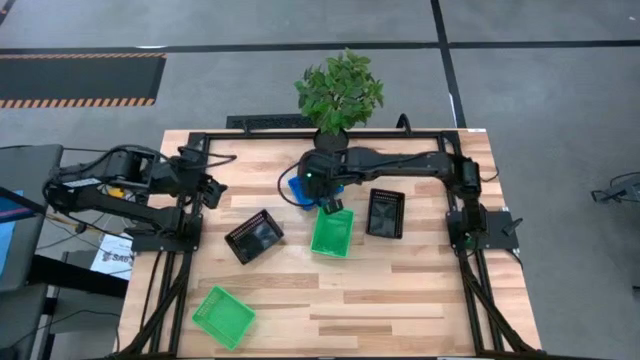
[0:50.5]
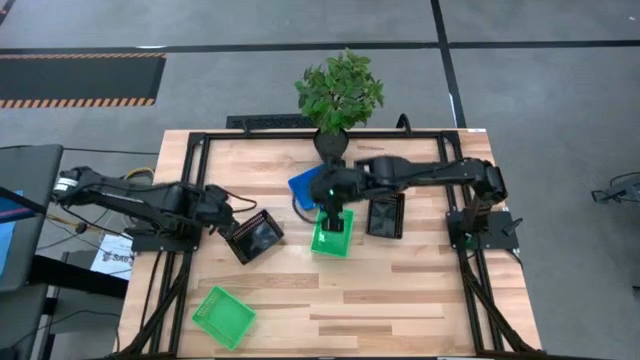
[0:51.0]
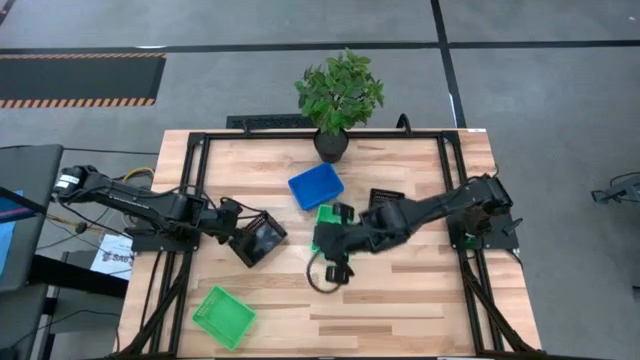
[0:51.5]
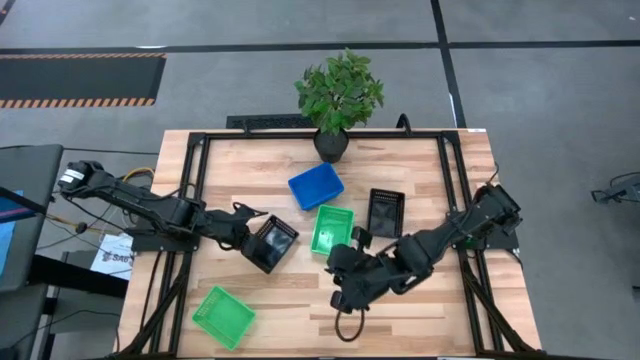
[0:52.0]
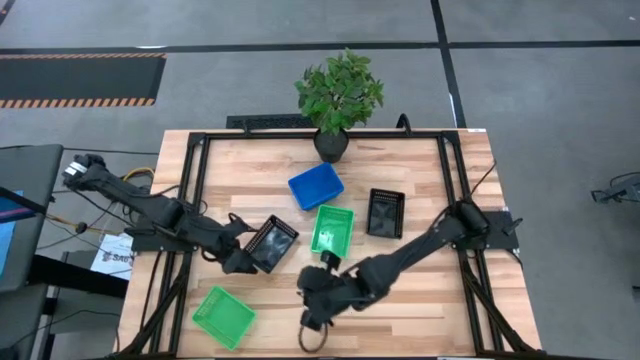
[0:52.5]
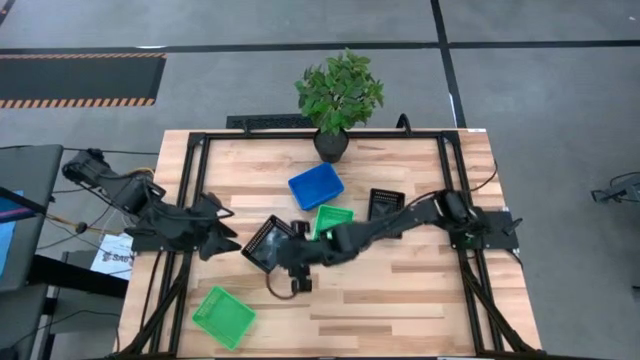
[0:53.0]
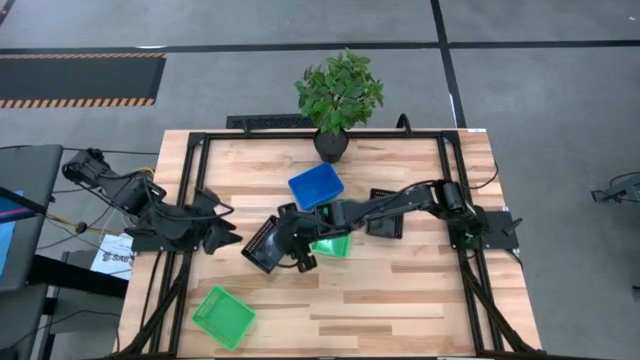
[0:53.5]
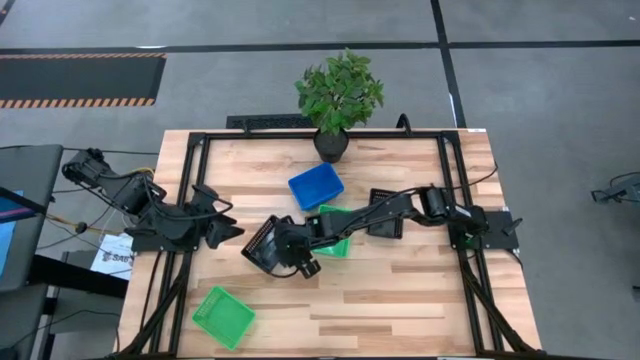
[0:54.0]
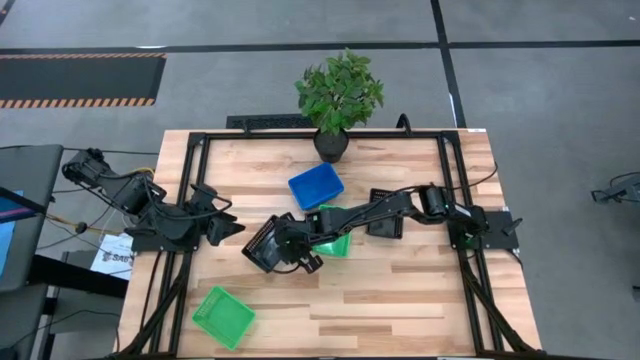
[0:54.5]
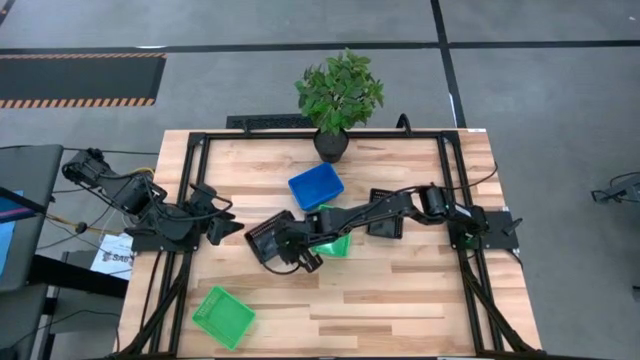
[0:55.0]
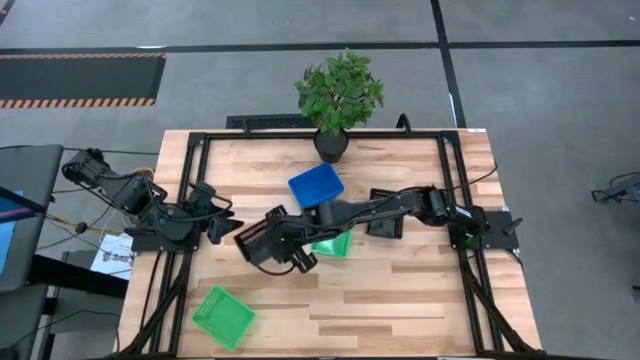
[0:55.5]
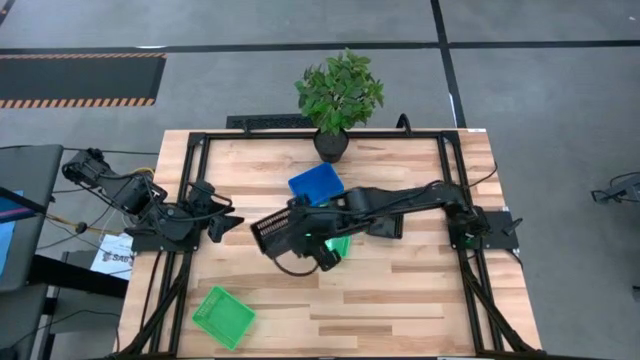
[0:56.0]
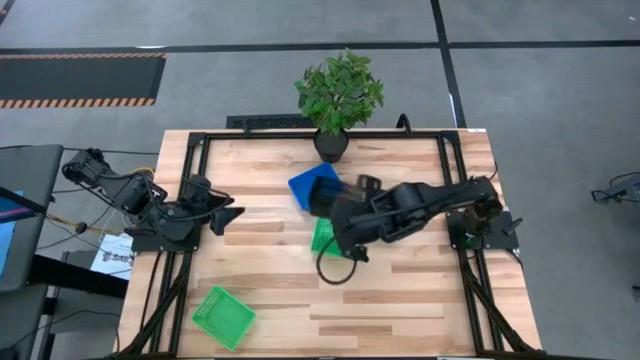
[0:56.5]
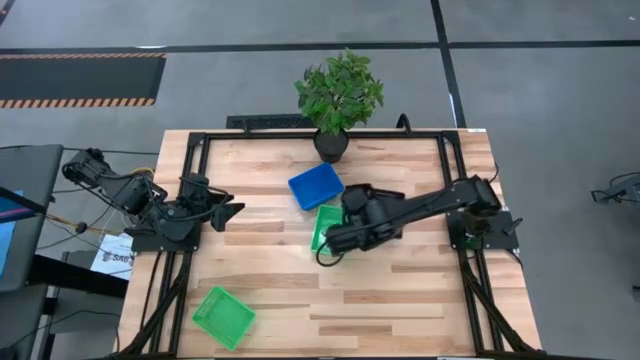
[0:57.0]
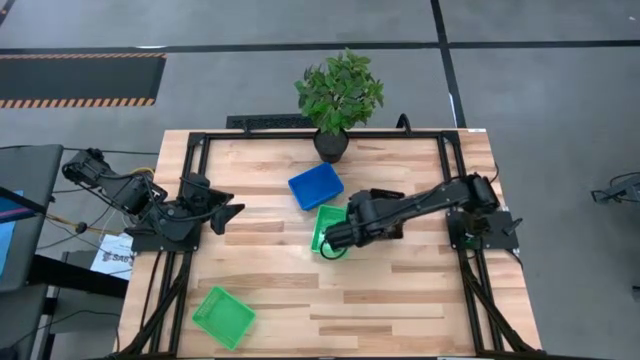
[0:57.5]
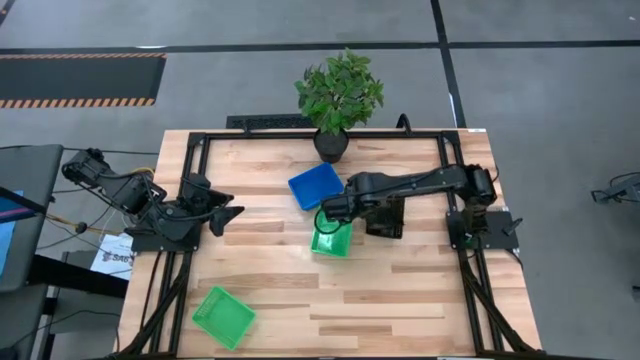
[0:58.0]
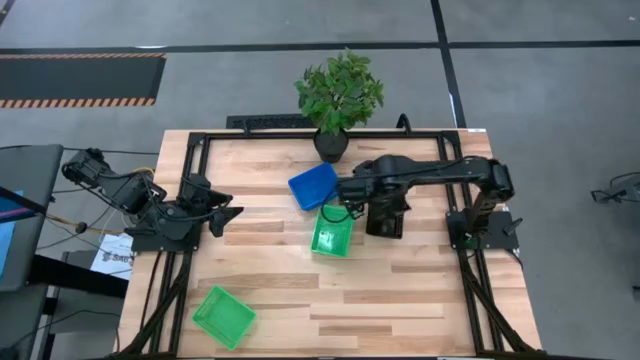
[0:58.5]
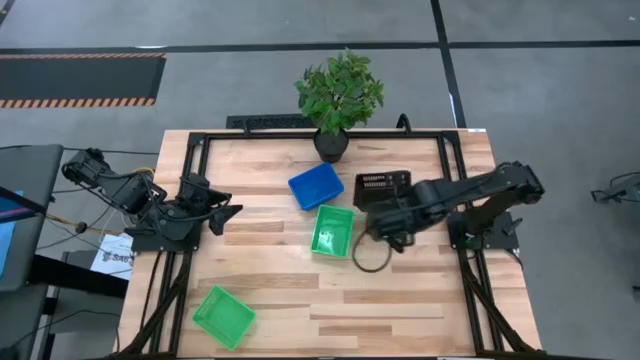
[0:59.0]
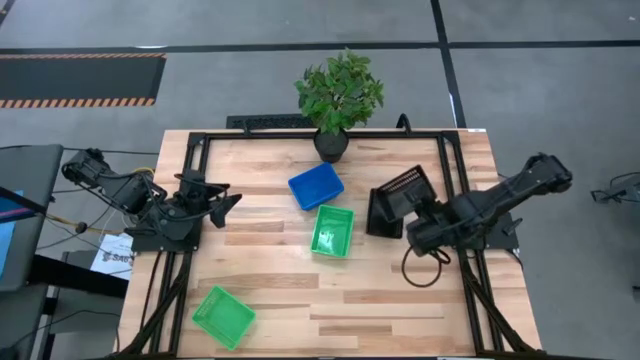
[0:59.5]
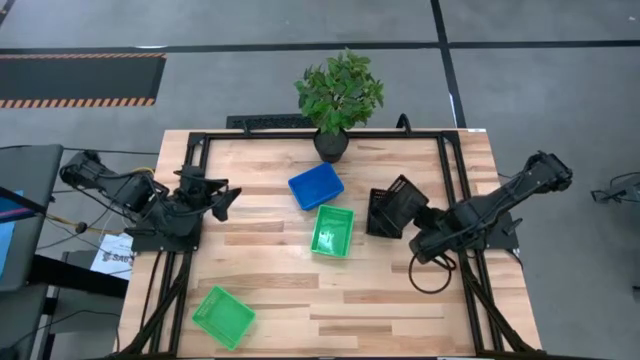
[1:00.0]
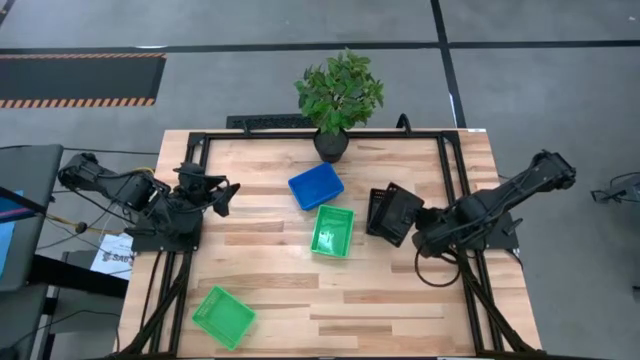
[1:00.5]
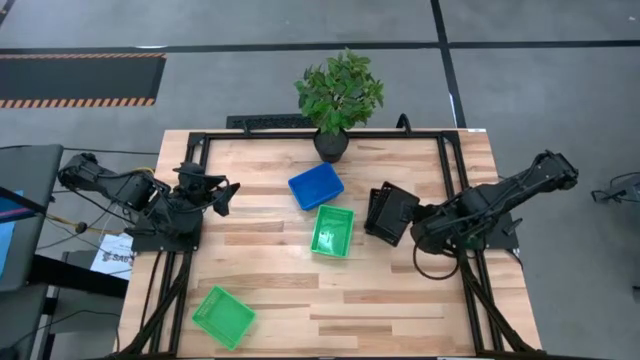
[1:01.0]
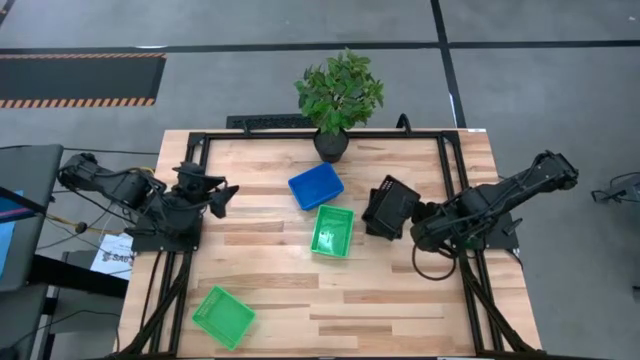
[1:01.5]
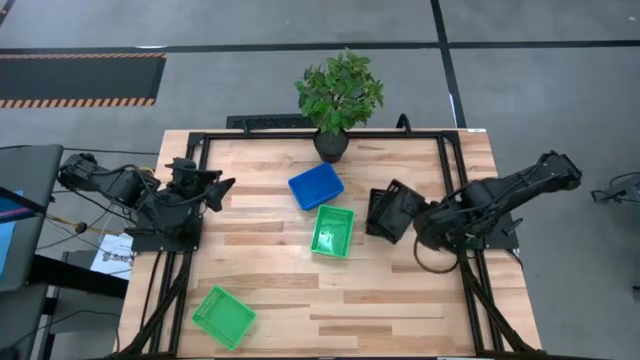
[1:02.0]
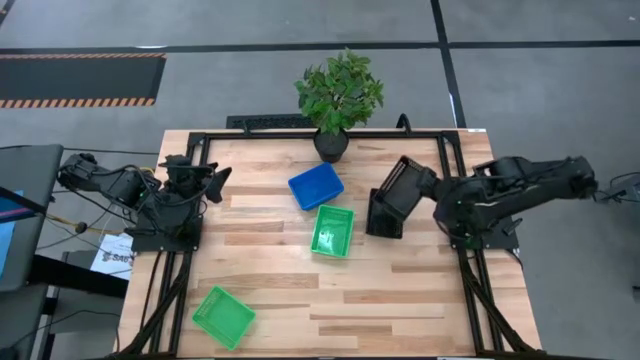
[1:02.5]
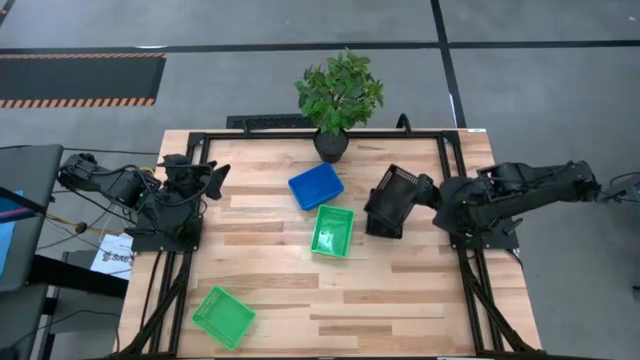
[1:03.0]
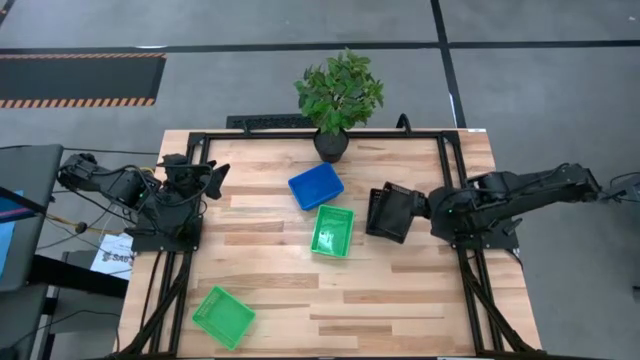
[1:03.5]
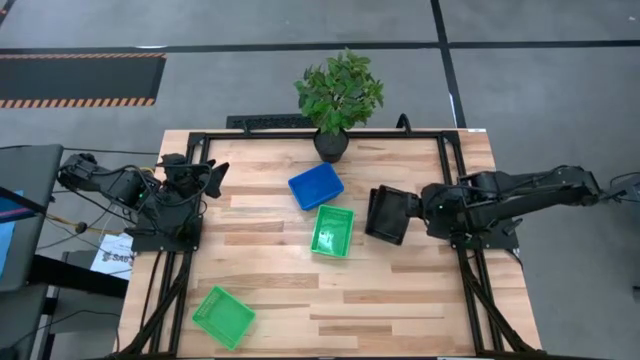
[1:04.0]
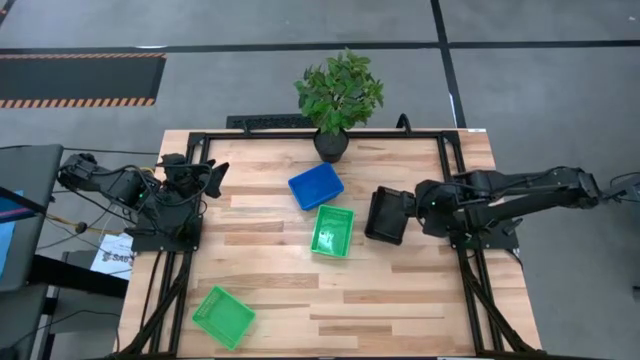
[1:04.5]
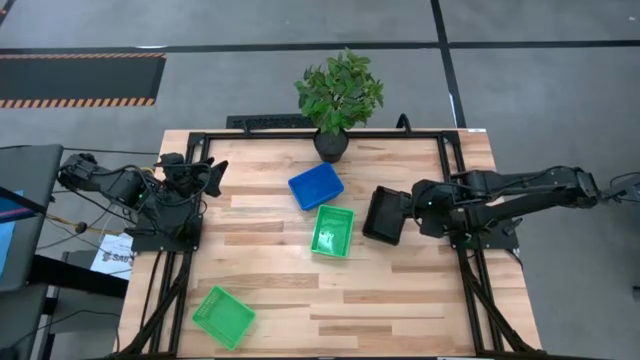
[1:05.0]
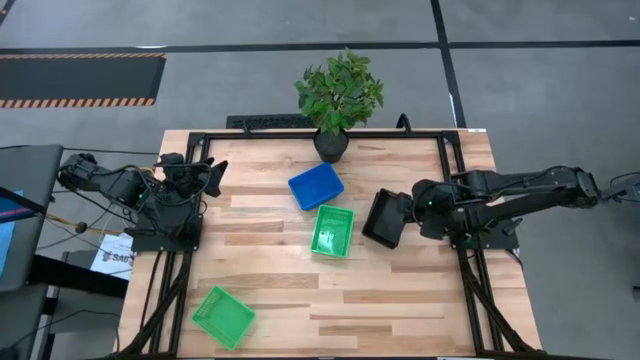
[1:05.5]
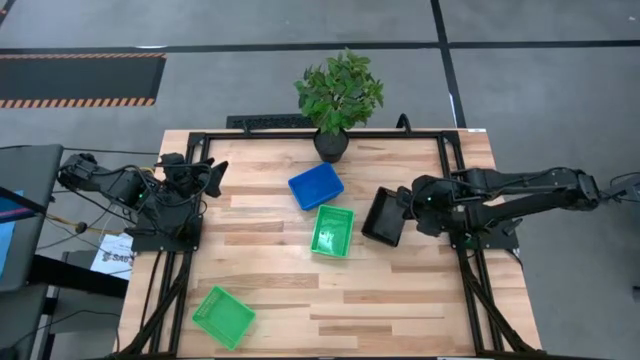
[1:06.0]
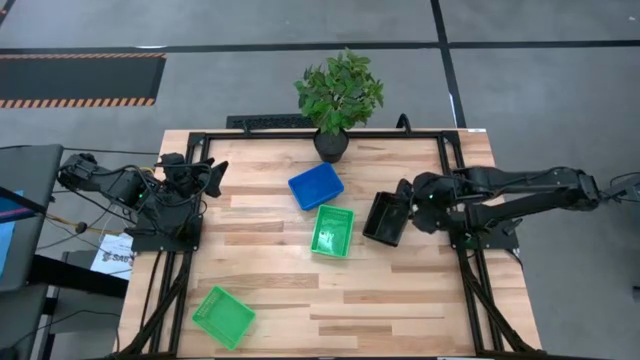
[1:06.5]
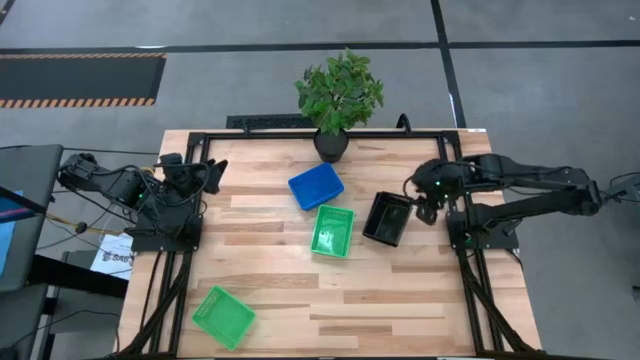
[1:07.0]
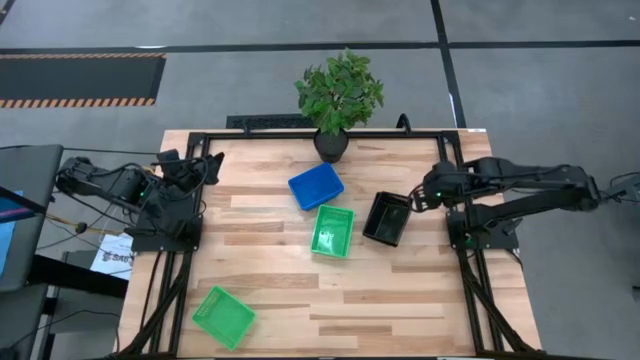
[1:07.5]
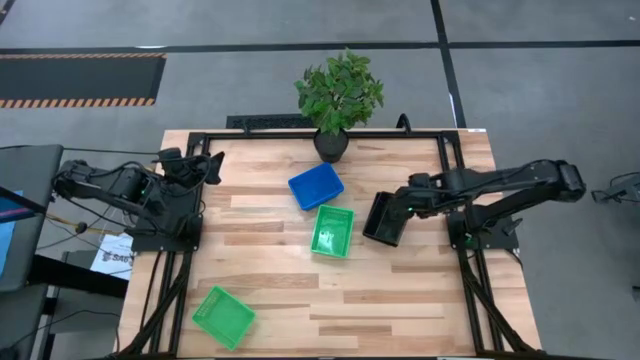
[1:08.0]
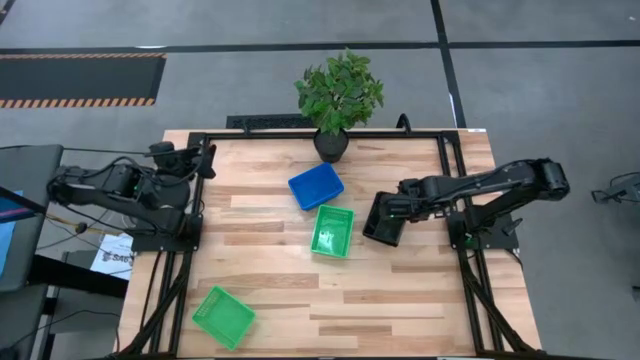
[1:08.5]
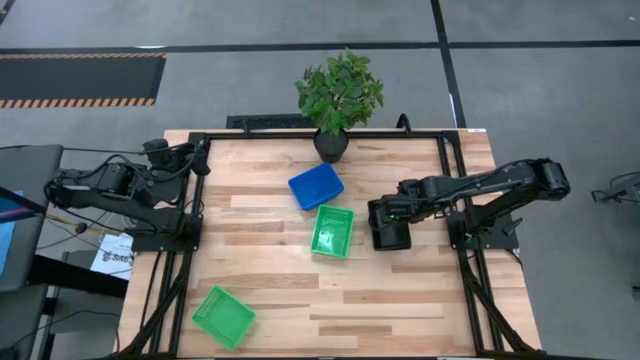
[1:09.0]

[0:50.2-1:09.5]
Stack the left black bin on the right black bins
